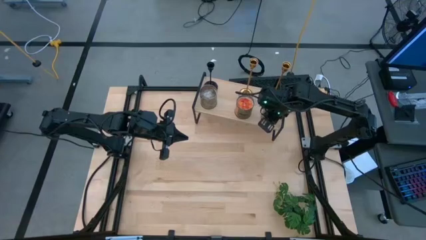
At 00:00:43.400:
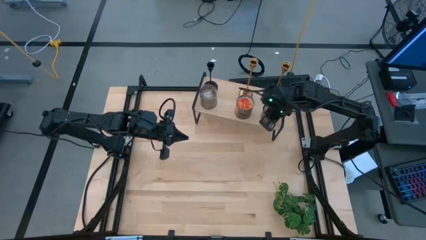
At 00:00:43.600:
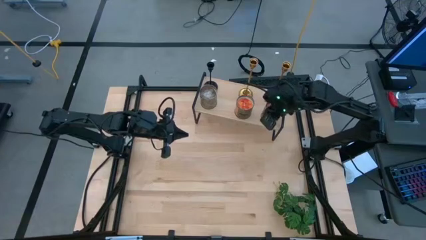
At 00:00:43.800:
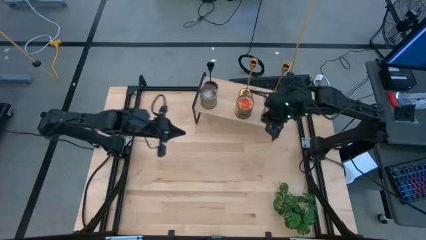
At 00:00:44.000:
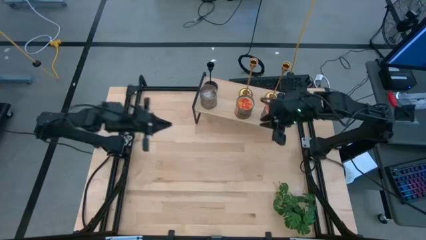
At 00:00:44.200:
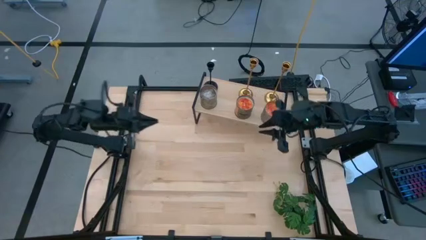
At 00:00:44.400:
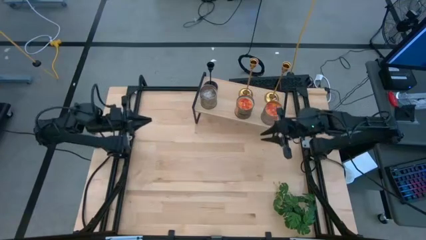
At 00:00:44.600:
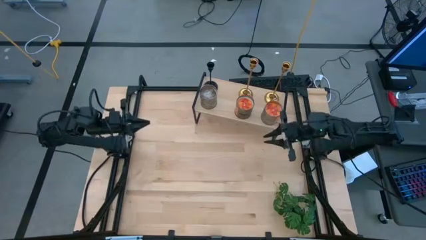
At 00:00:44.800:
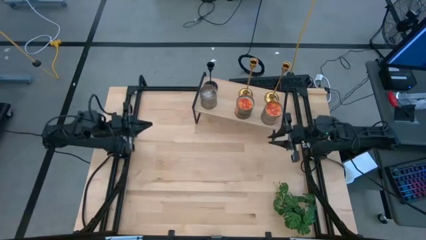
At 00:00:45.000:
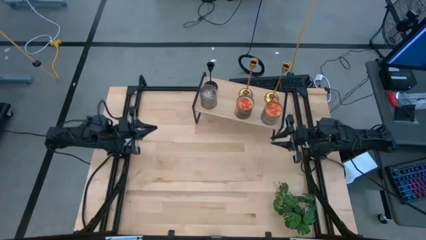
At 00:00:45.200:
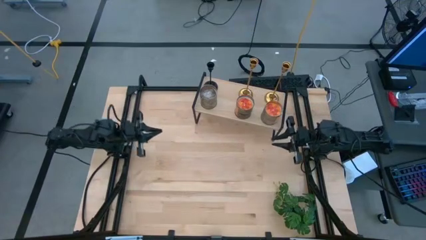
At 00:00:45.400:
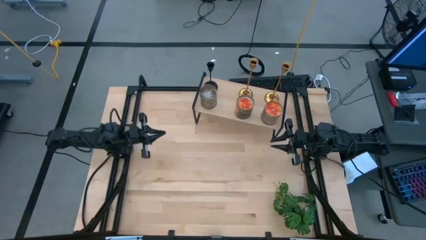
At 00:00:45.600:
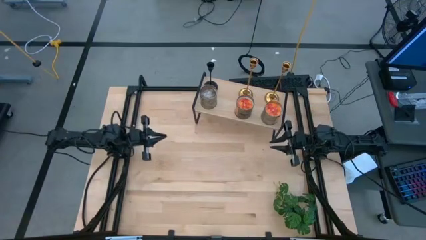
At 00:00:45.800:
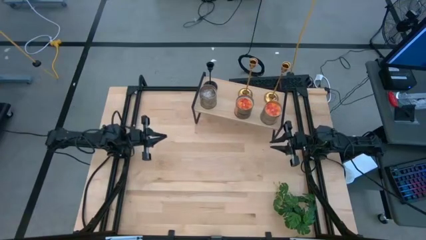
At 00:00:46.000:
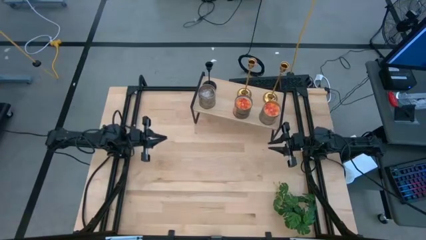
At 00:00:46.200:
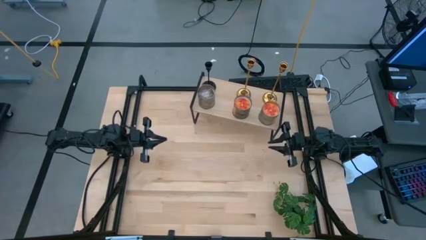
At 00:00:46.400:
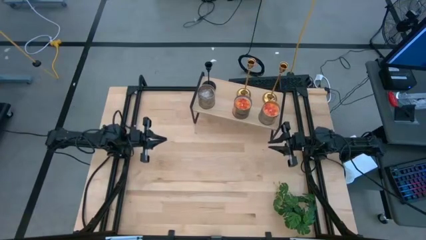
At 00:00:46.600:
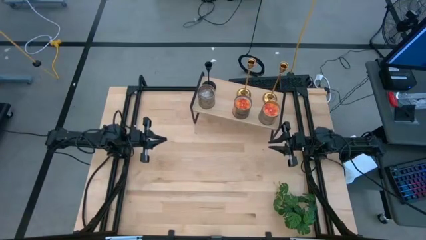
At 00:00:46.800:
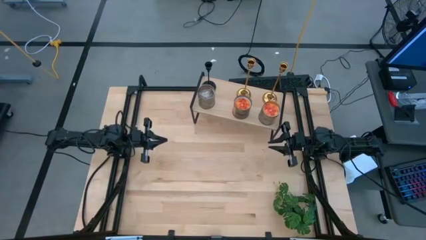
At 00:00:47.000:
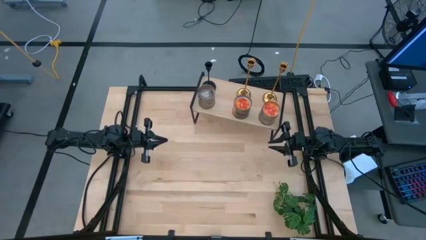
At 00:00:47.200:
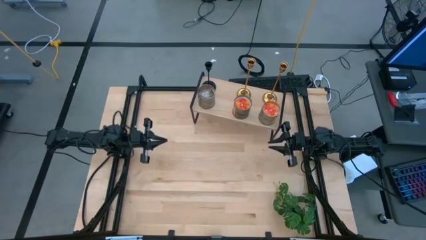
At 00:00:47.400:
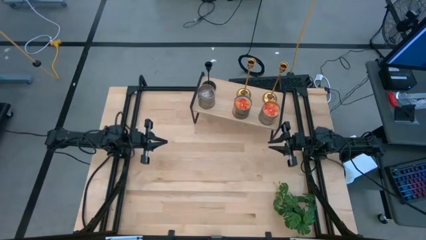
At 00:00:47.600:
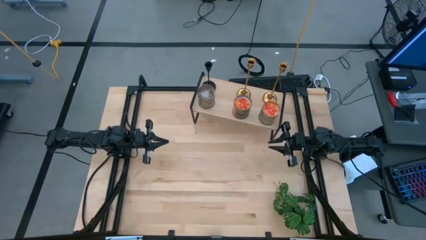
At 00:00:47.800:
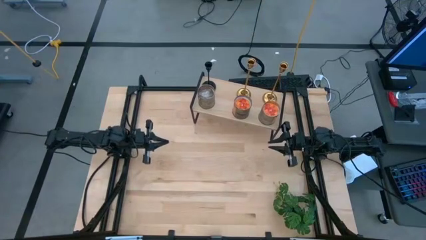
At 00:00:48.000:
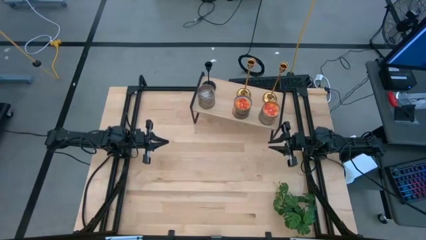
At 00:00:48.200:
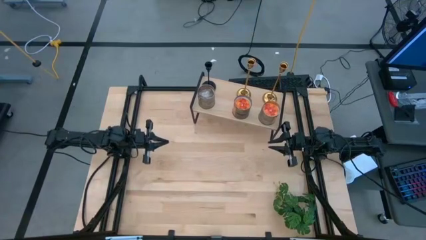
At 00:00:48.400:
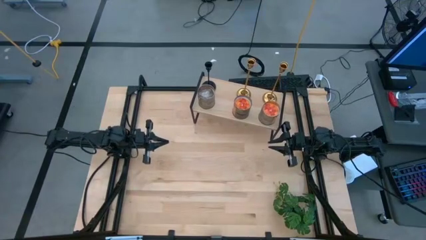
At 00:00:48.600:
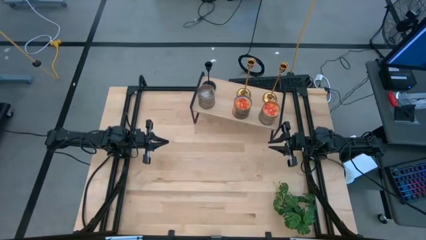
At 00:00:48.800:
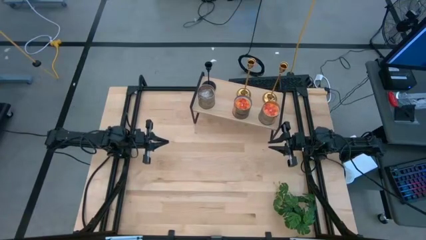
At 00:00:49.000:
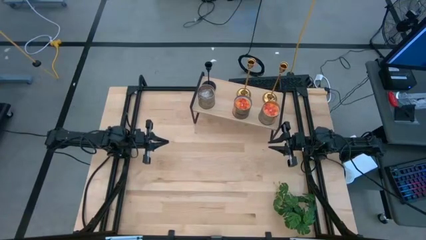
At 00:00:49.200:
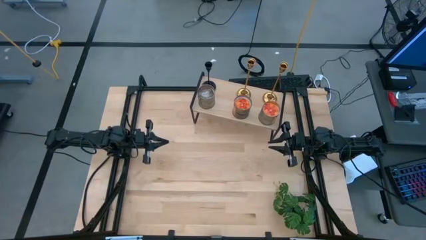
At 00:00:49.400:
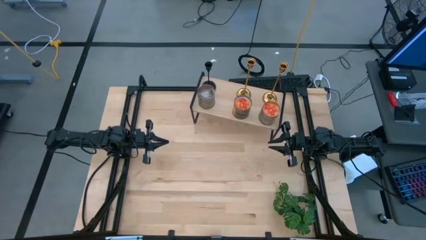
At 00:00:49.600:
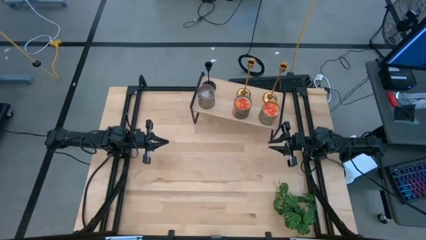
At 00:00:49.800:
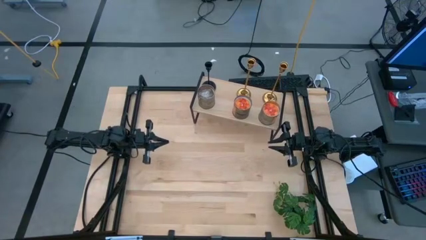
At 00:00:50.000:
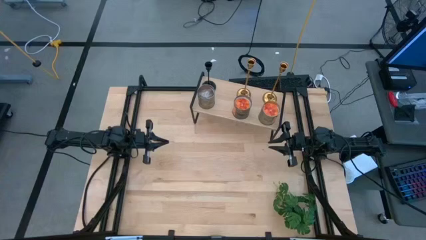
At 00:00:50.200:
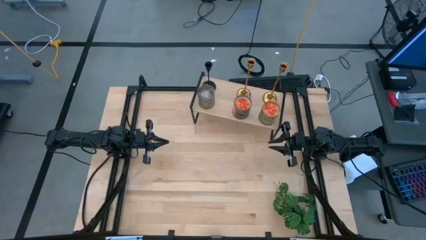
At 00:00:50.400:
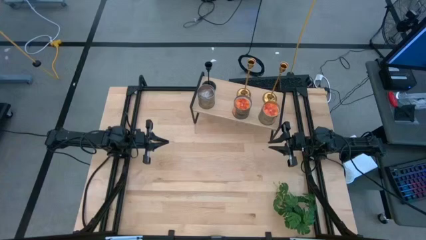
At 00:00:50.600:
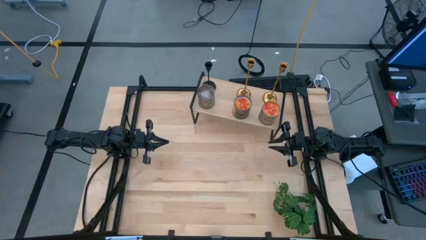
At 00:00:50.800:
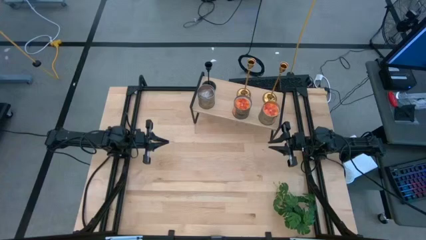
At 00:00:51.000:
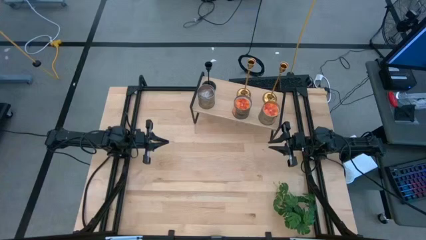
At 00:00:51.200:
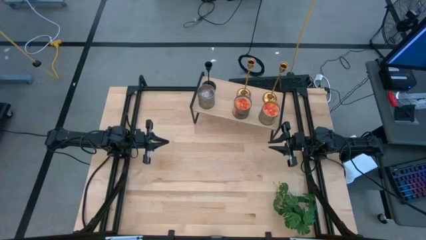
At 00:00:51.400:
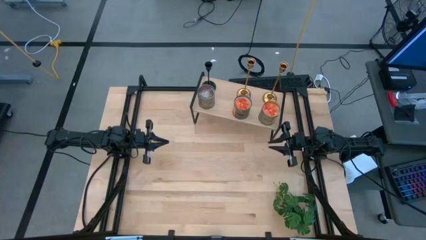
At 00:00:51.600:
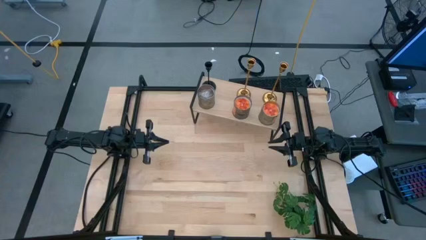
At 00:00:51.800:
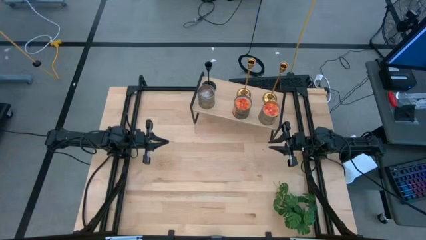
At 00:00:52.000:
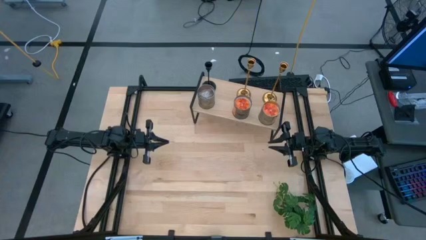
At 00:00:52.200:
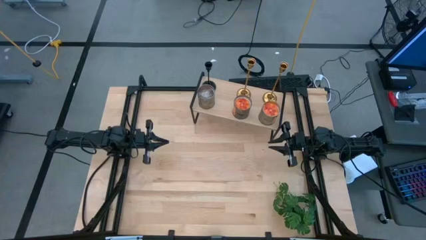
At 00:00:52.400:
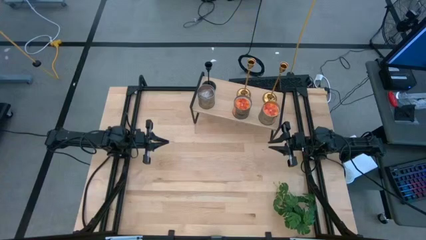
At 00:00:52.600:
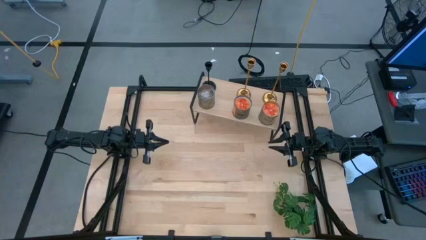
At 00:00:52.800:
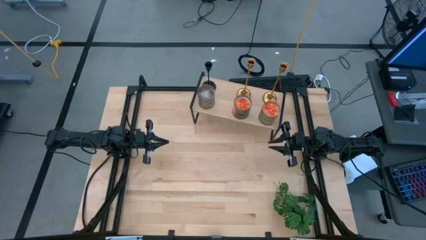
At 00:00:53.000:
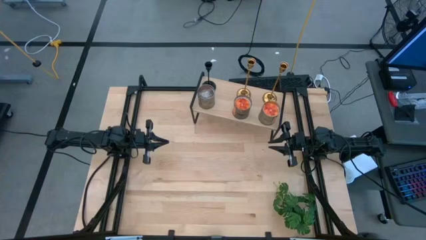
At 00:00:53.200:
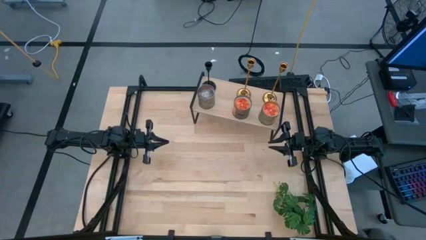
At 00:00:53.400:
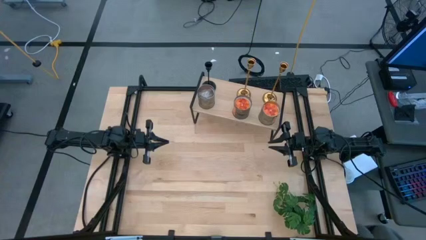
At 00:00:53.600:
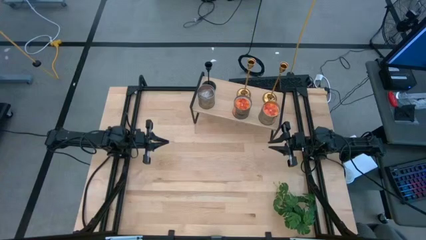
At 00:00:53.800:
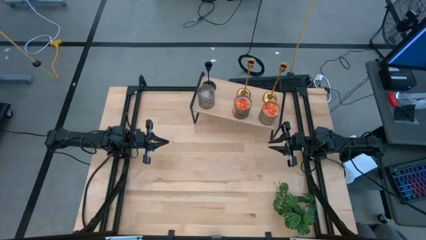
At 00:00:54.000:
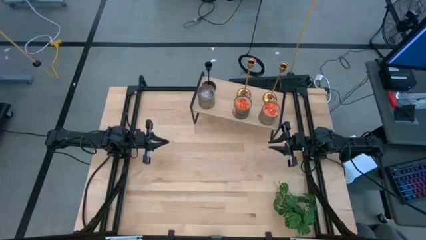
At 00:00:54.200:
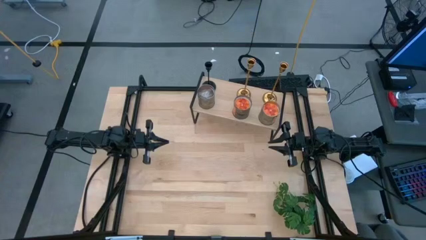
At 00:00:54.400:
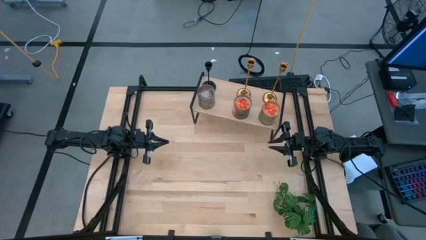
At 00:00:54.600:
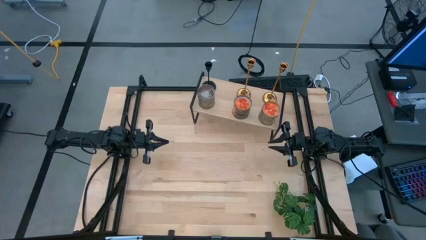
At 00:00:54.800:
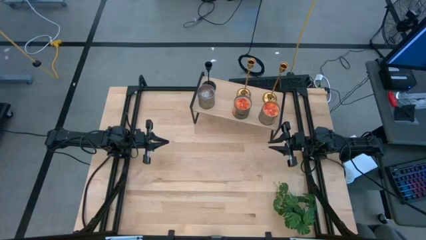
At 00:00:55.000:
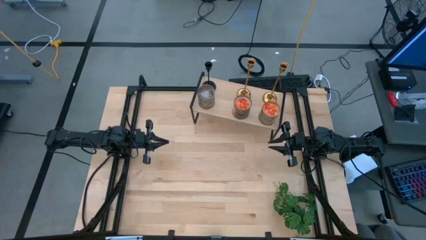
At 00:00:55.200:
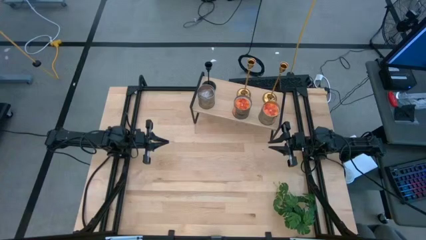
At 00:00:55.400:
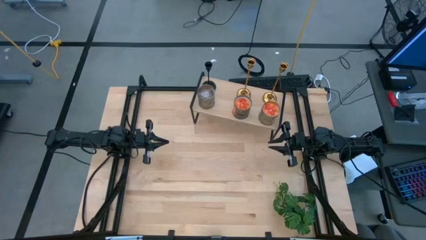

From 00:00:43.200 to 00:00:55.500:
Task: Pick & Place candle stick holders
Return to Home Position
